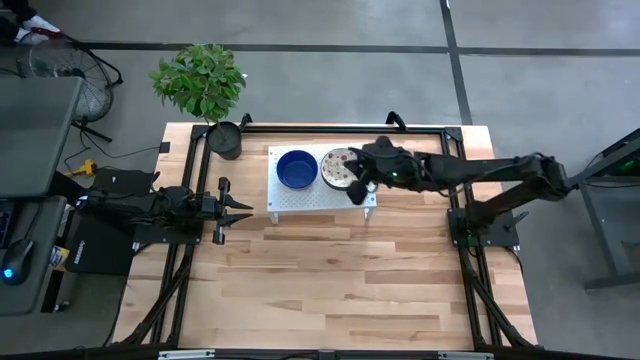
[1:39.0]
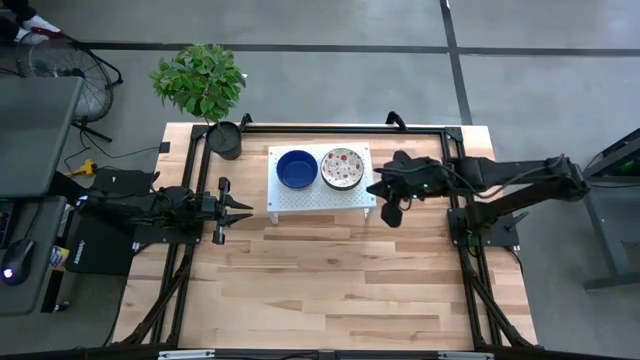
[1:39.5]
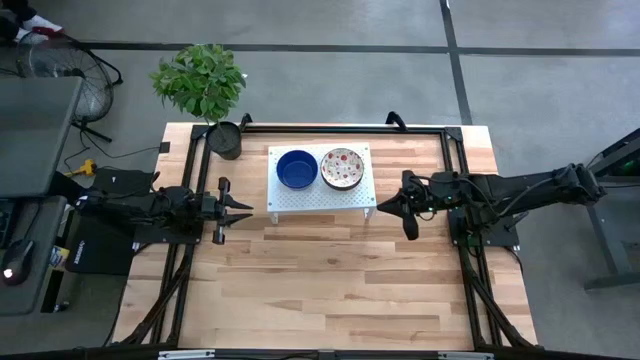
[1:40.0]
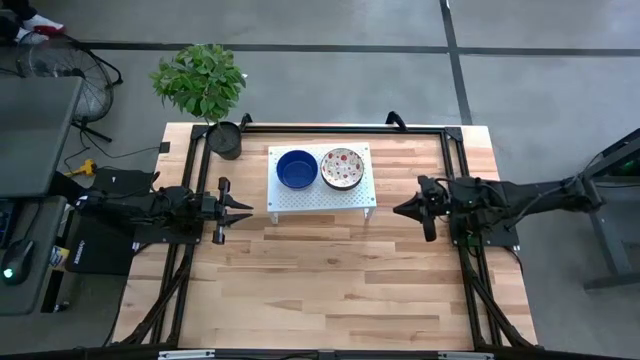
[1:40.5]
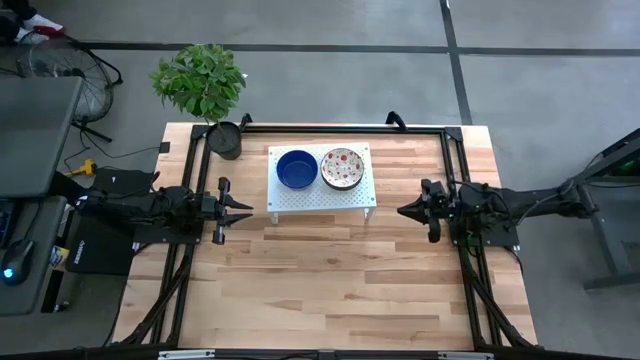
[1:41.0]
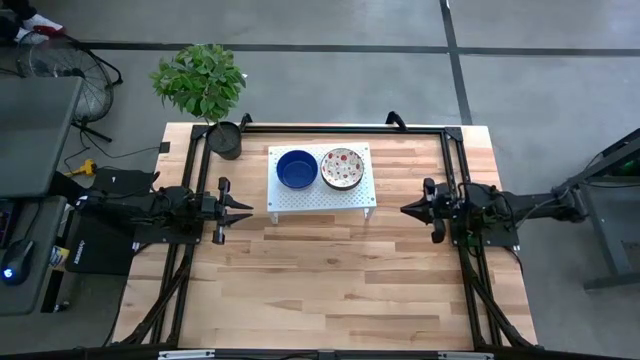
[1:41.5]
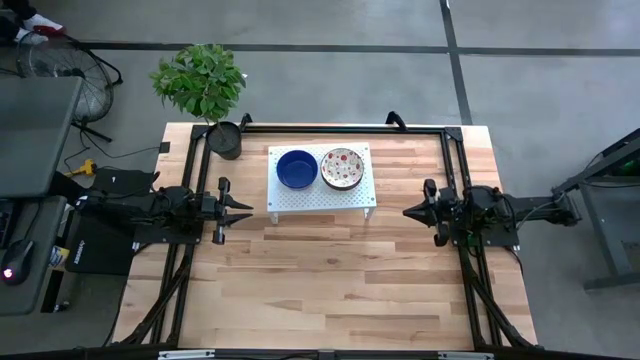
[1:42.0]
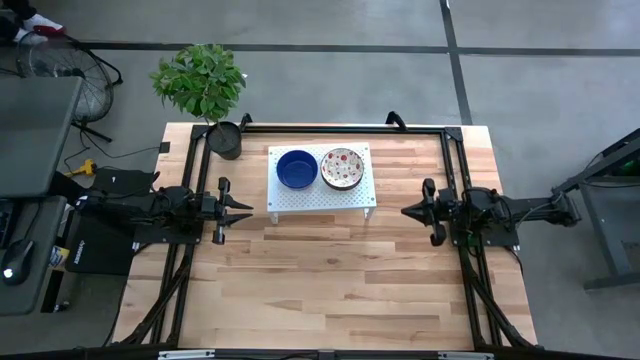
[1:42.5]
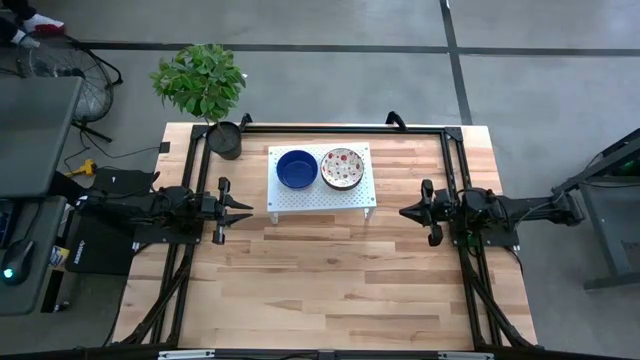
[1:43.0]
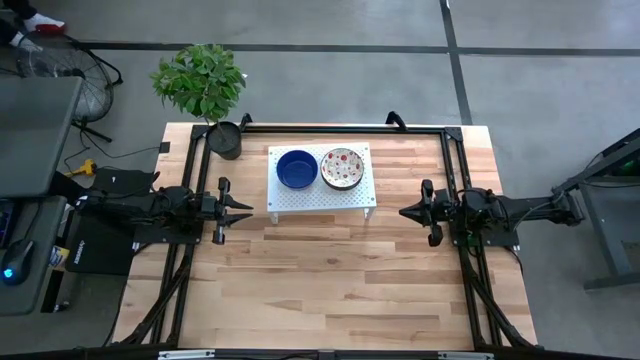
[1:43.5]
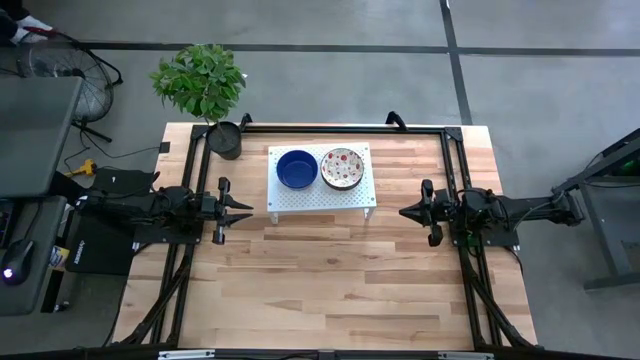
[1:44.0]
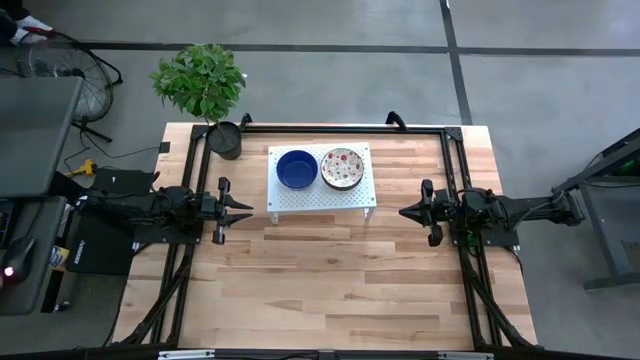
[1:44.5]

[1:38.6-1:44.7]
Task: Pick & Place Mini bowls
Return to Home Position

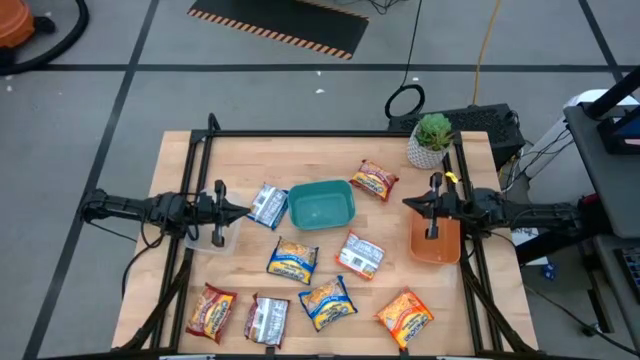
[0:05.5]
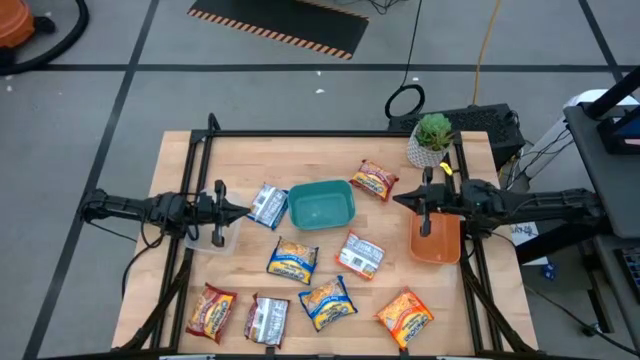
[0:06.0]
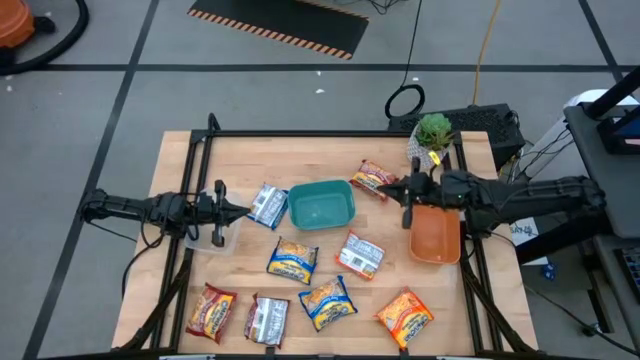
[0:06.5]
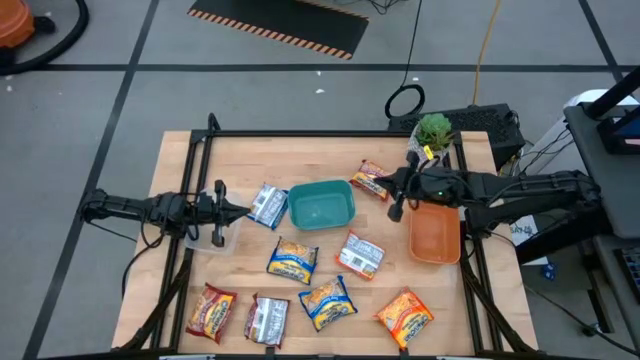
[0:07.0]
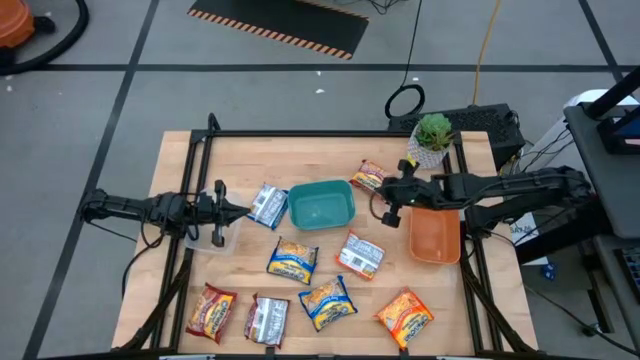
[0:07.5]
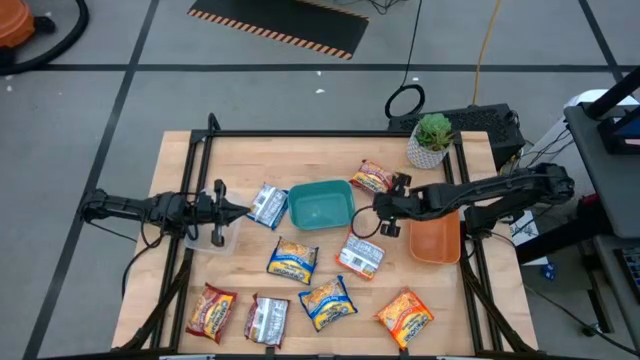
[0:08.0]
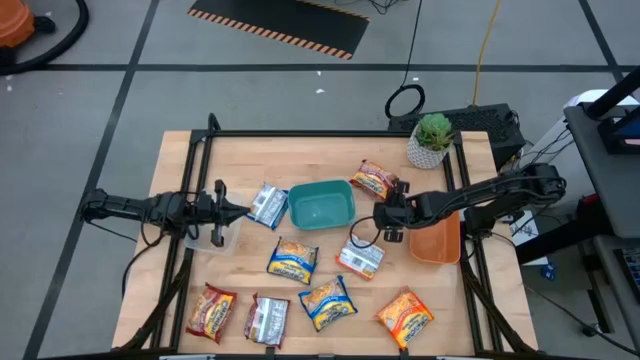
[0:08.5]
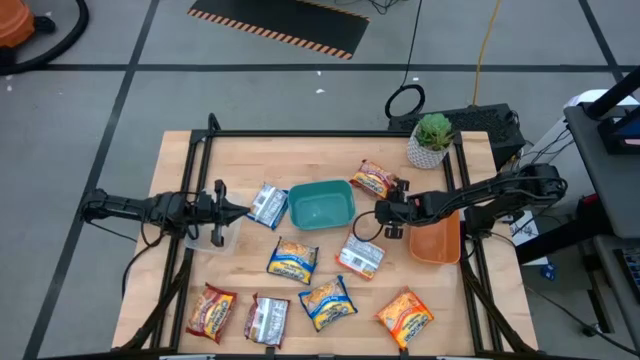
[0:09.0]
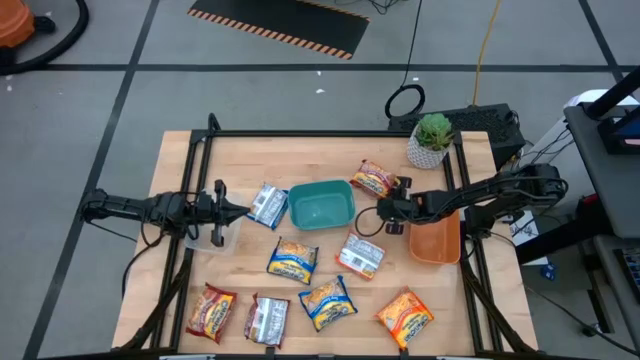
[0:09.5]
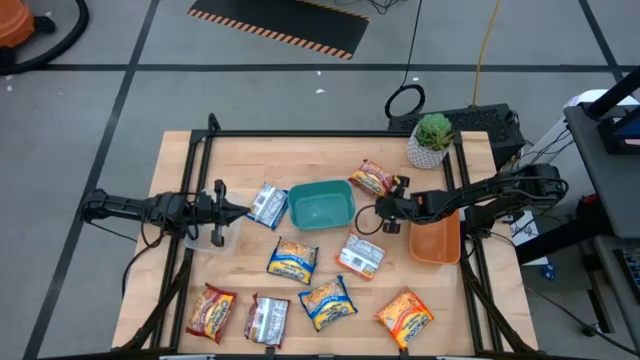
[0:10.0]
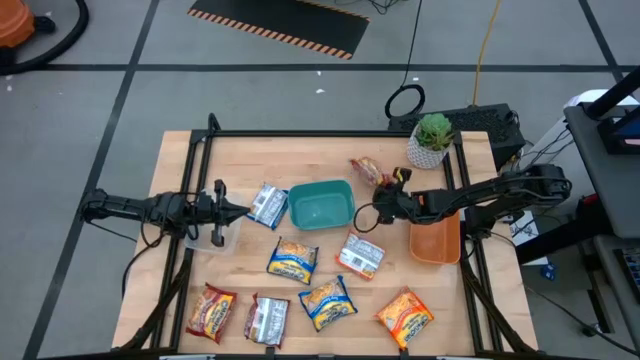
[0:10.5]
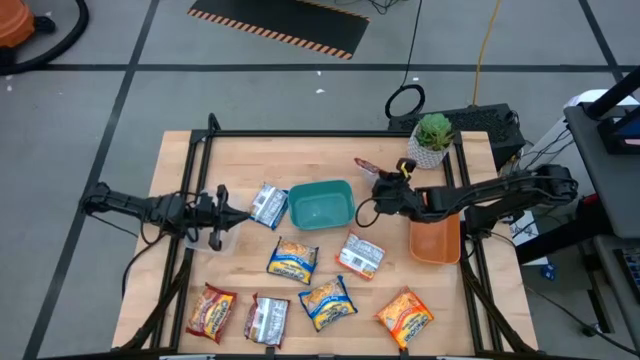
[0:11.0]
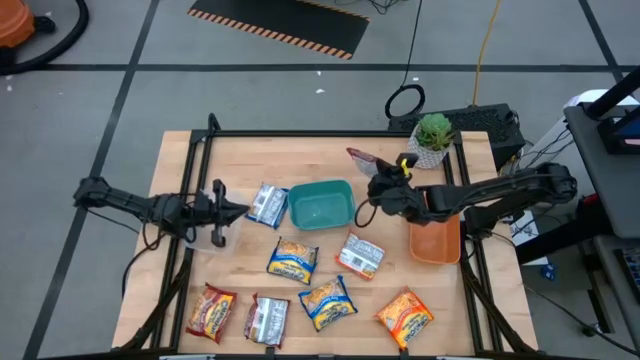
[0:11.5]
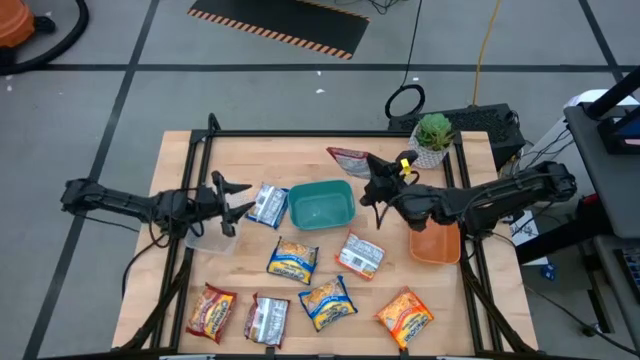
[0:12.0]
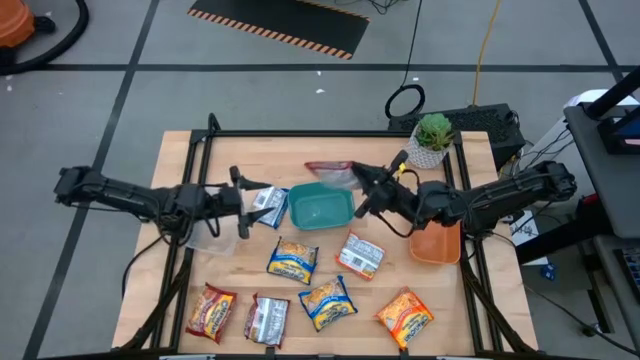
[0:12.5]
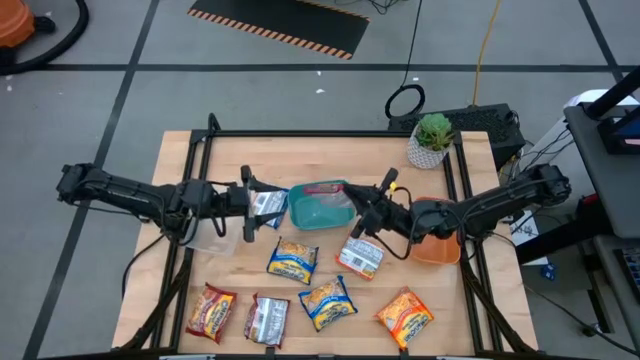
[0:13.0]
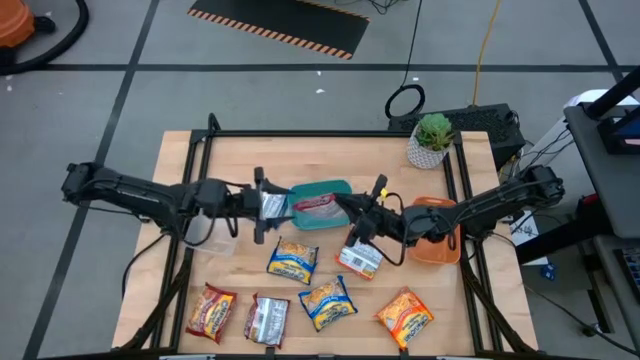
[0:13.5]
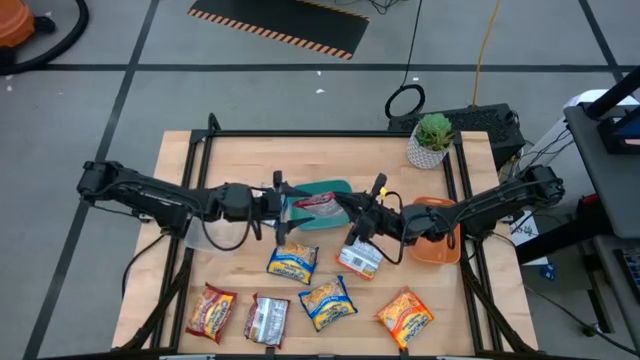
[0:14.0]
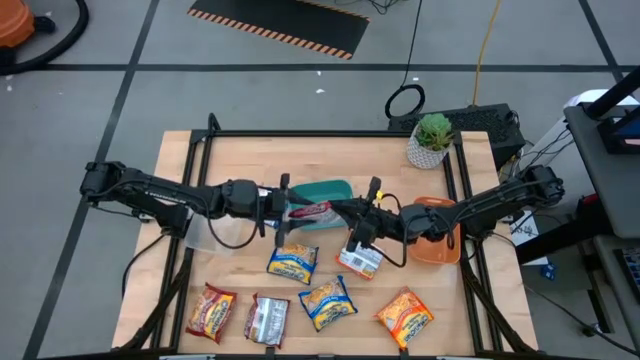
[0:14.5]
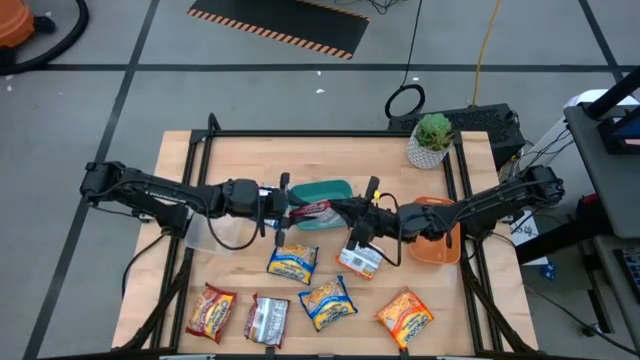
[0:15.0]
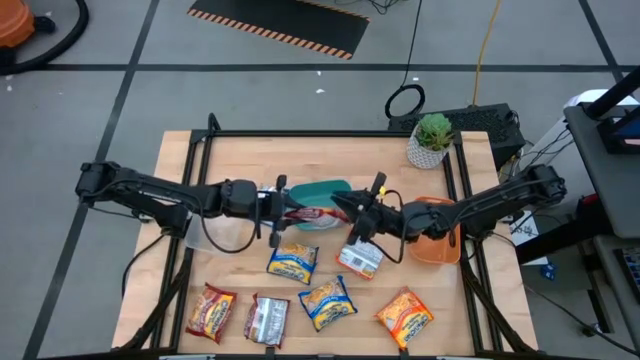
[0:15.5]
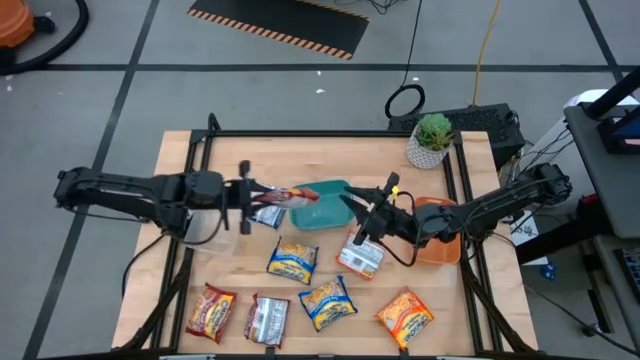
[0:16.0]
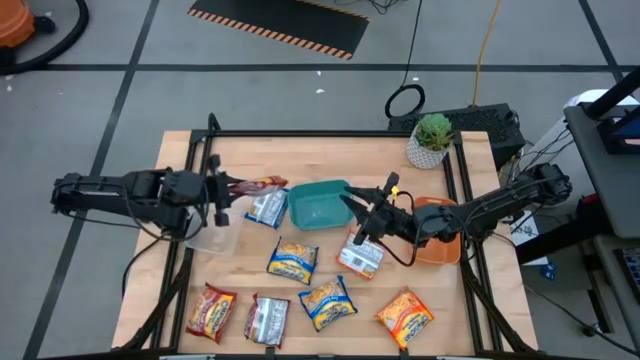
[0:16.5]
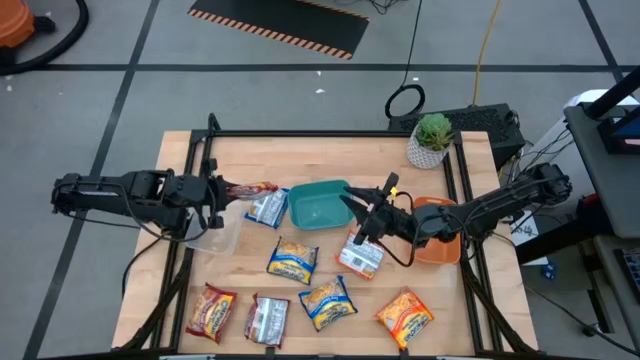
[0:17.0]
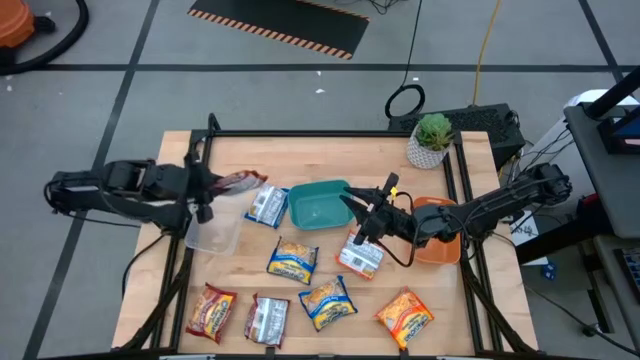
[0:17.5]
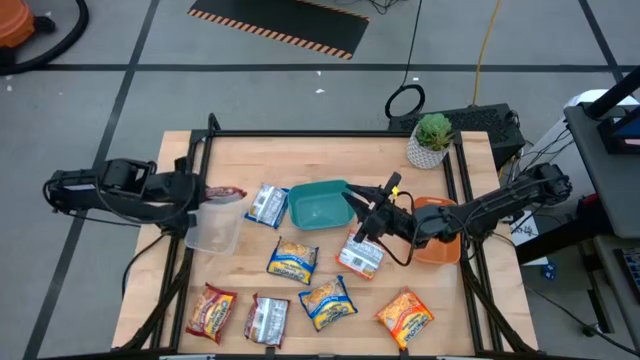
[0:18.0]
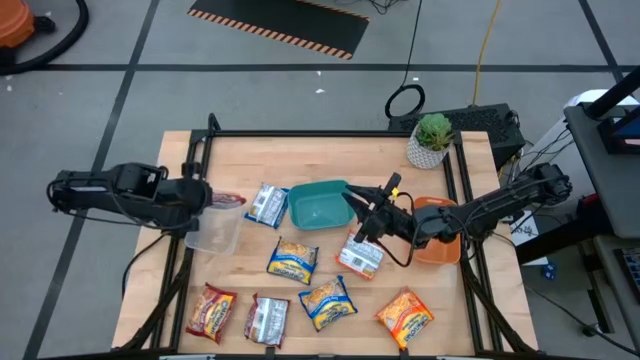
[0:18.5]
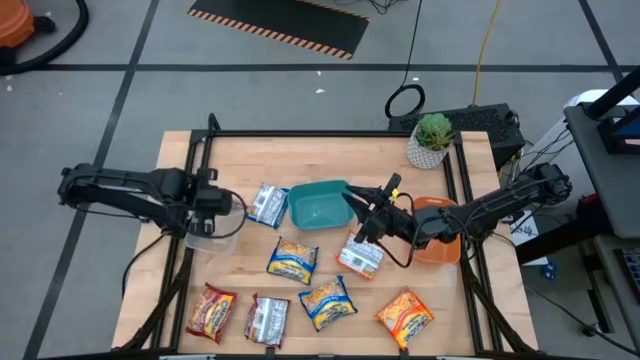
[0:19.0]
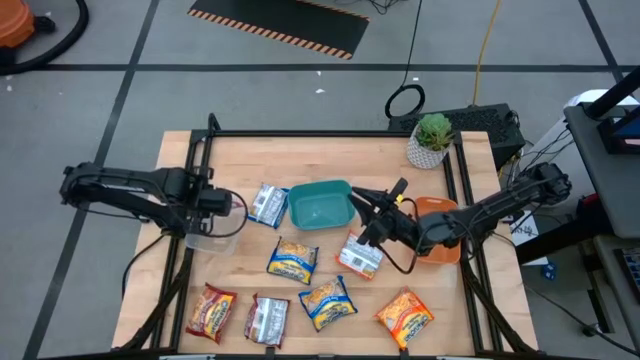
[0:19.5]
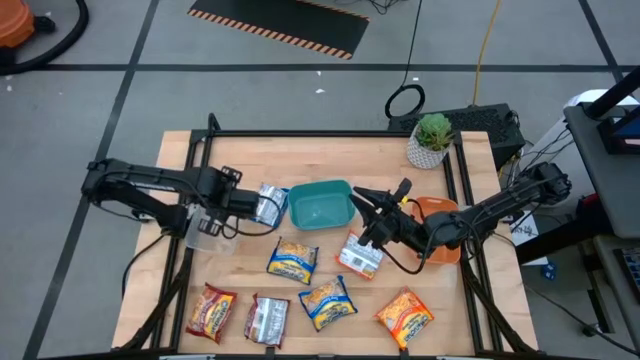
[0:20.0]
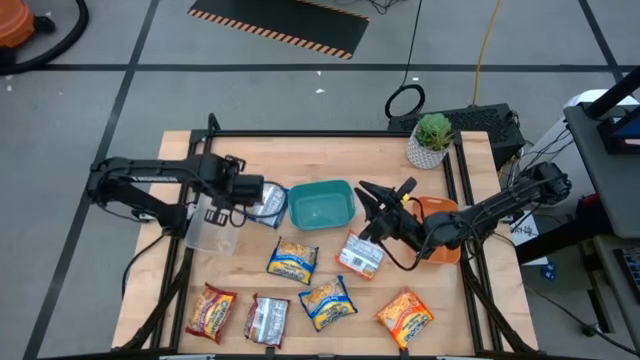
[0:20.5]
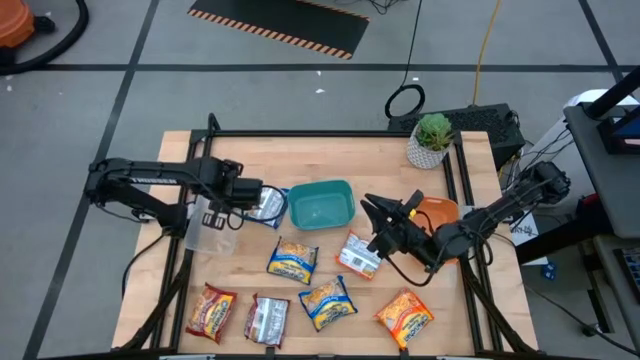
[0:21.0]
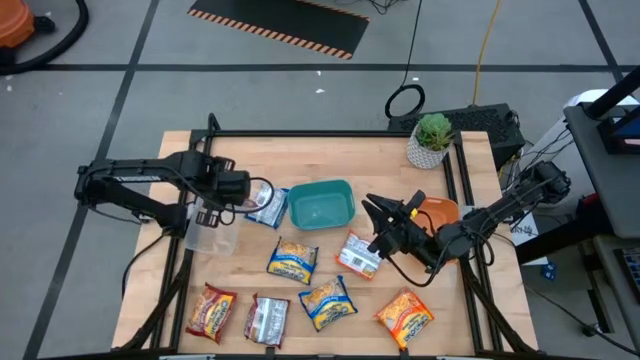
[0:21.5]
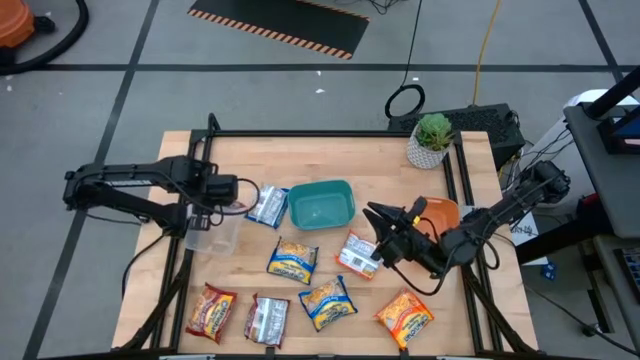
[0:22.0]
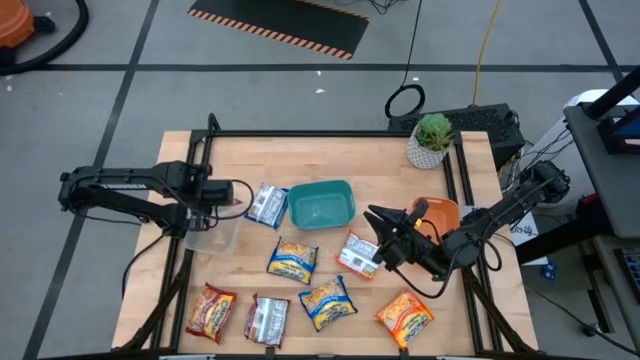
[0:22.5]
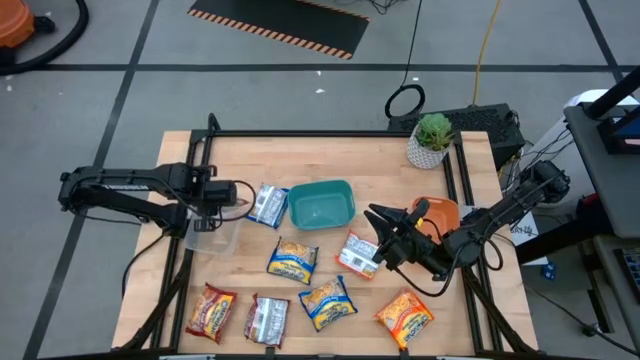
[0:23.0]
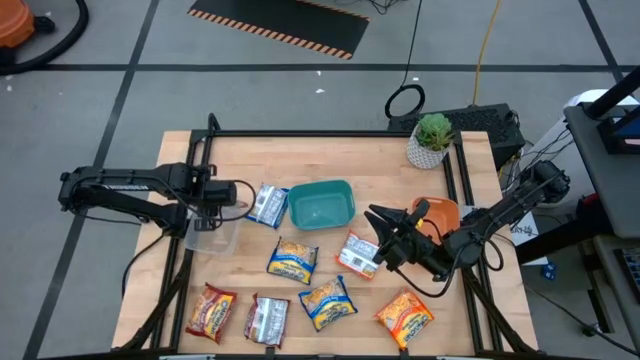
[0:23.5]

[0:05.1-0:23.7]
Task: Sort Maruchan noodles
Put the top red noodle pack into the transparent bin
